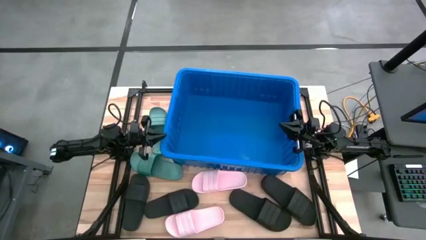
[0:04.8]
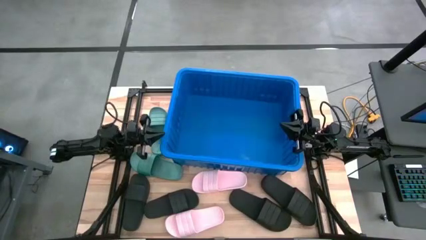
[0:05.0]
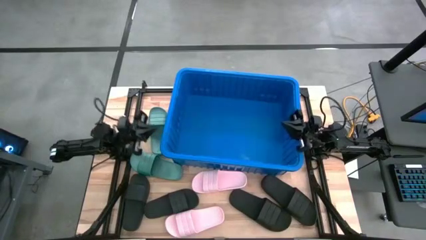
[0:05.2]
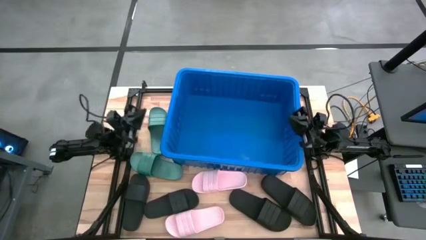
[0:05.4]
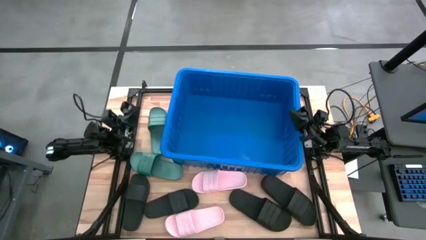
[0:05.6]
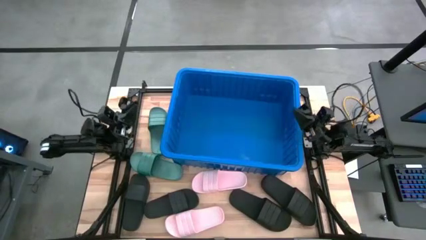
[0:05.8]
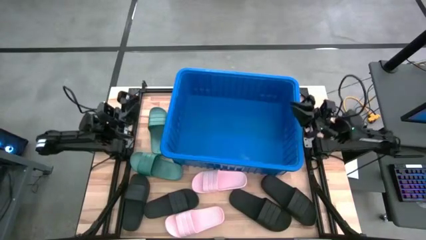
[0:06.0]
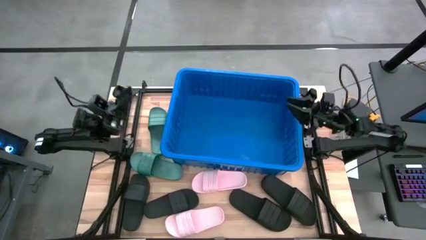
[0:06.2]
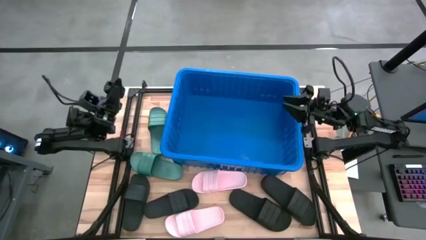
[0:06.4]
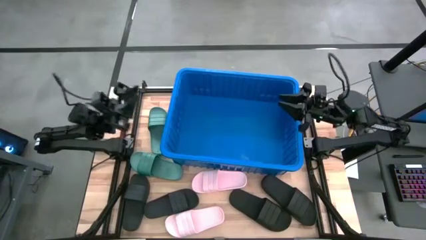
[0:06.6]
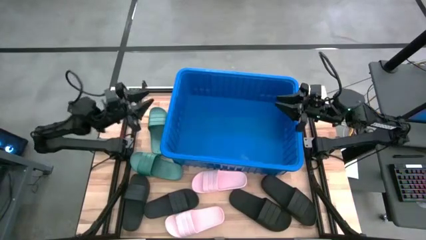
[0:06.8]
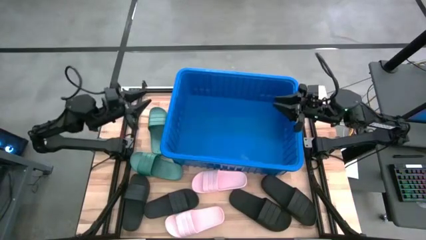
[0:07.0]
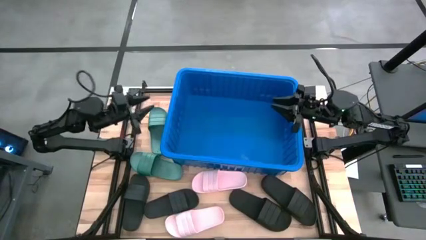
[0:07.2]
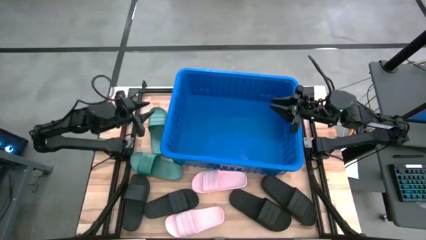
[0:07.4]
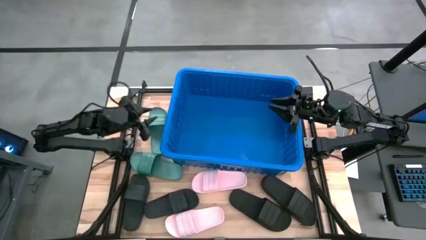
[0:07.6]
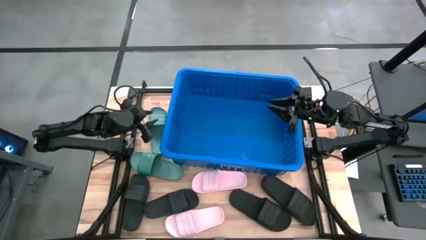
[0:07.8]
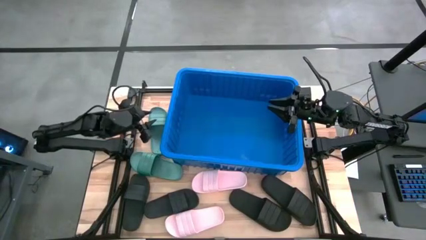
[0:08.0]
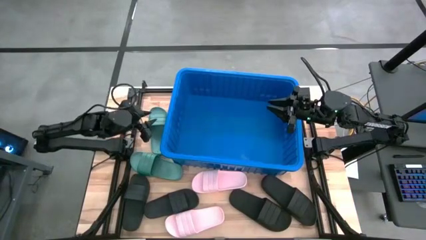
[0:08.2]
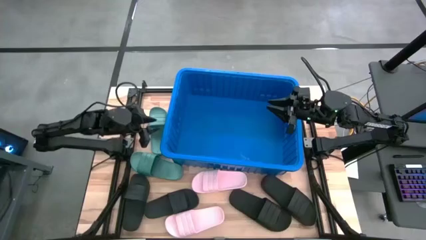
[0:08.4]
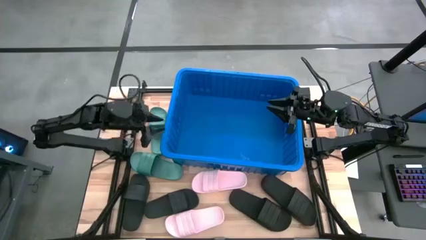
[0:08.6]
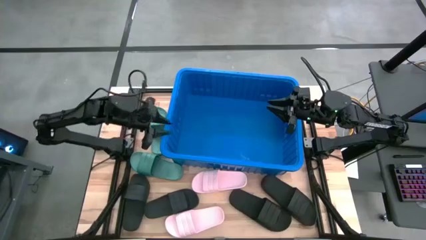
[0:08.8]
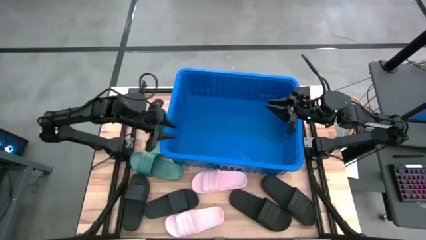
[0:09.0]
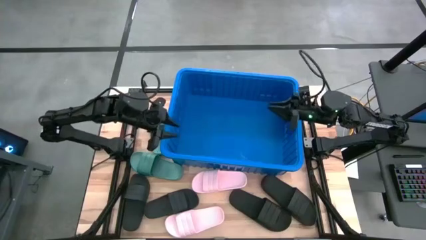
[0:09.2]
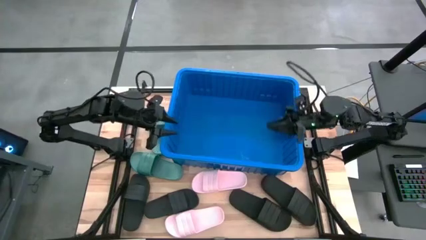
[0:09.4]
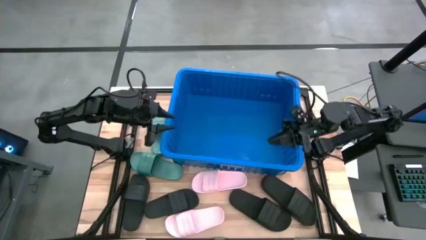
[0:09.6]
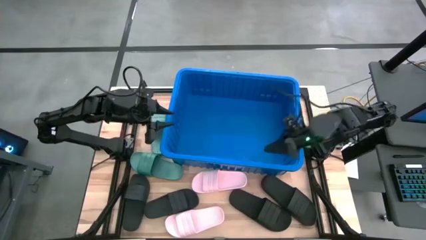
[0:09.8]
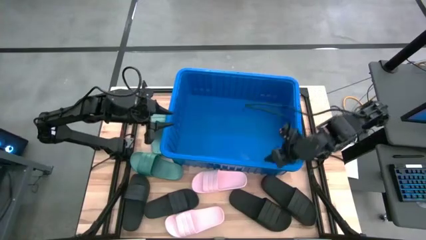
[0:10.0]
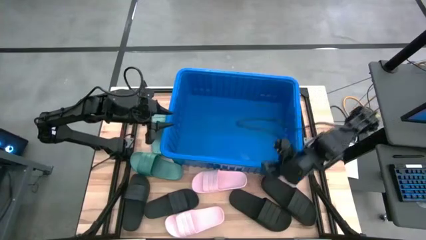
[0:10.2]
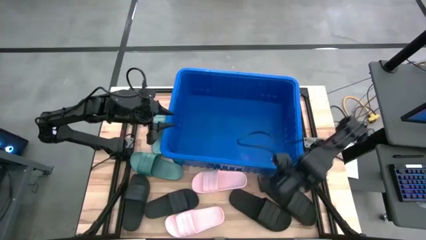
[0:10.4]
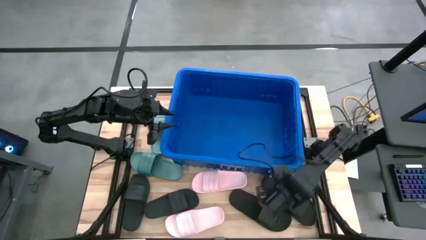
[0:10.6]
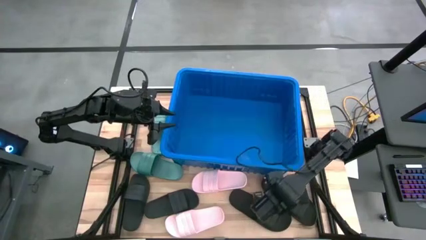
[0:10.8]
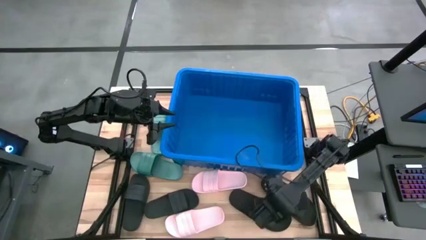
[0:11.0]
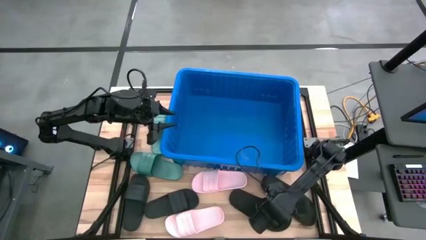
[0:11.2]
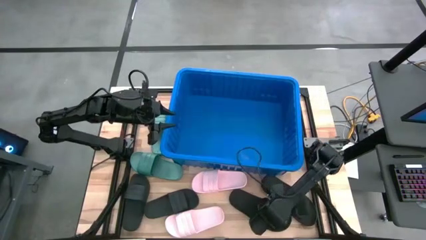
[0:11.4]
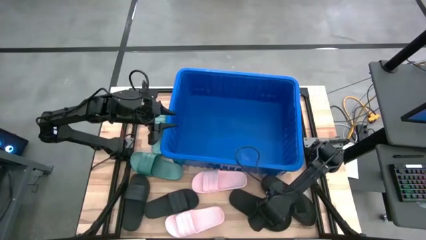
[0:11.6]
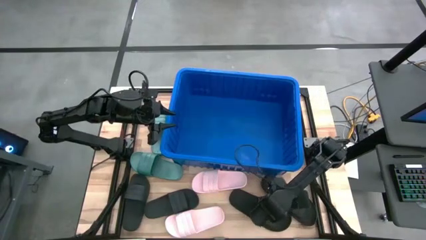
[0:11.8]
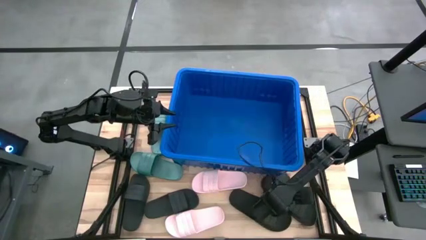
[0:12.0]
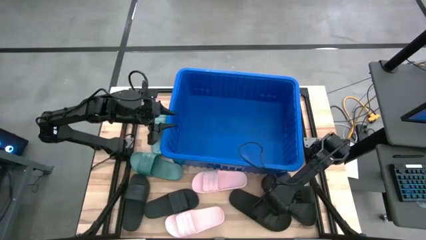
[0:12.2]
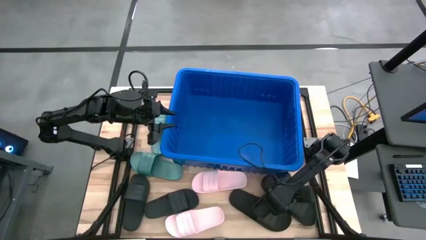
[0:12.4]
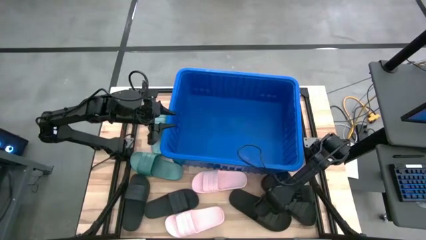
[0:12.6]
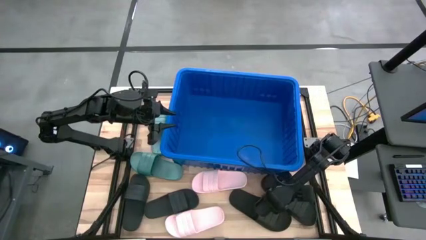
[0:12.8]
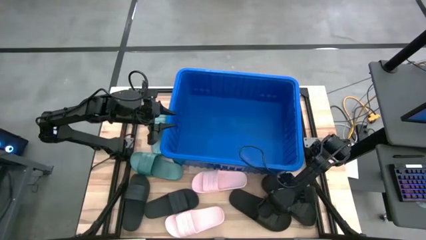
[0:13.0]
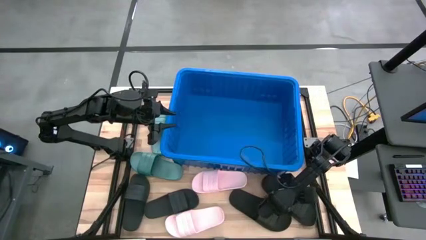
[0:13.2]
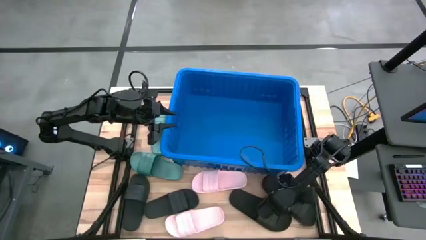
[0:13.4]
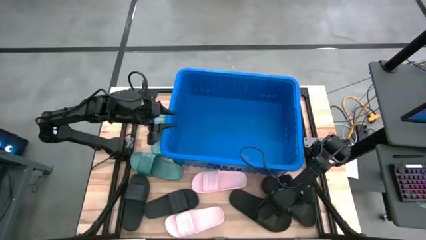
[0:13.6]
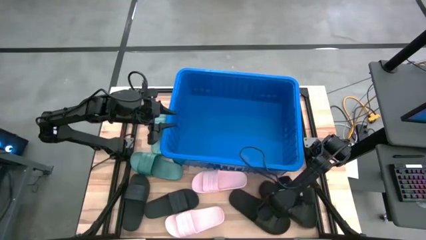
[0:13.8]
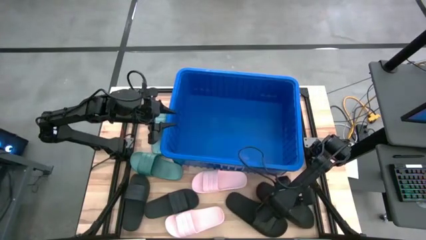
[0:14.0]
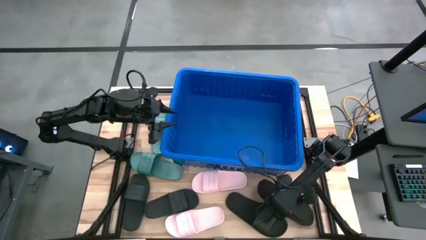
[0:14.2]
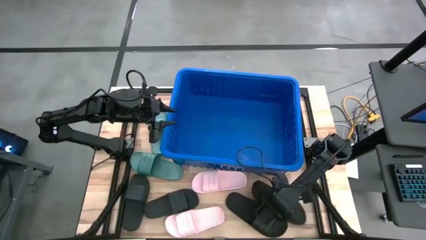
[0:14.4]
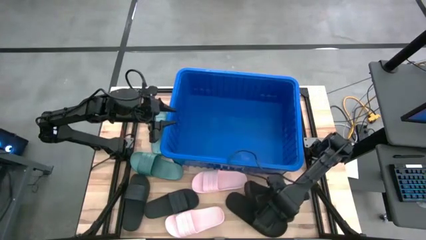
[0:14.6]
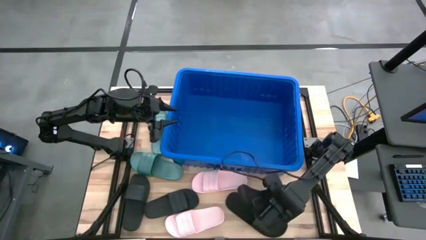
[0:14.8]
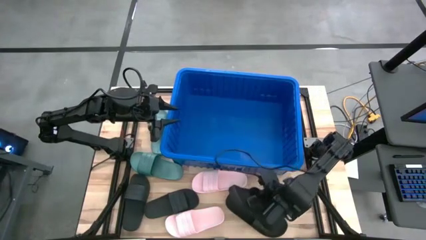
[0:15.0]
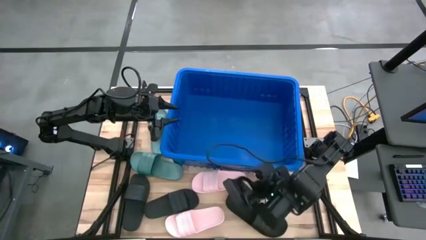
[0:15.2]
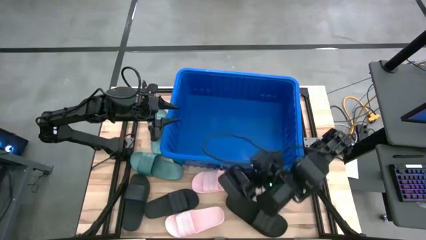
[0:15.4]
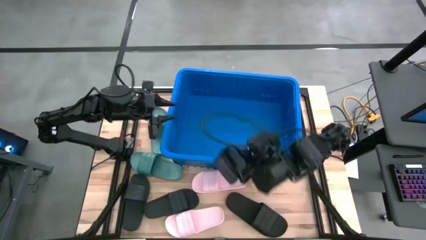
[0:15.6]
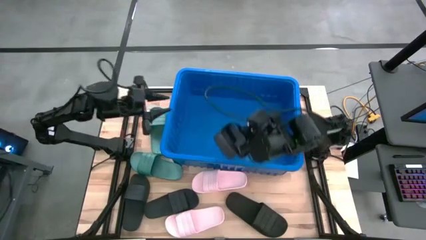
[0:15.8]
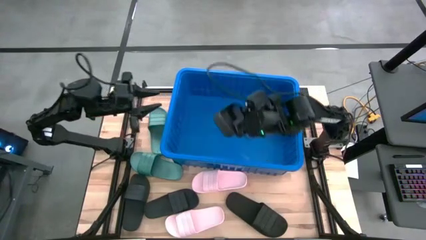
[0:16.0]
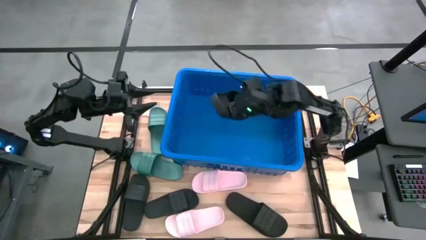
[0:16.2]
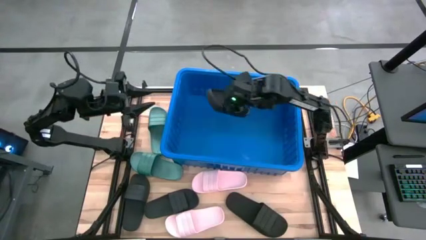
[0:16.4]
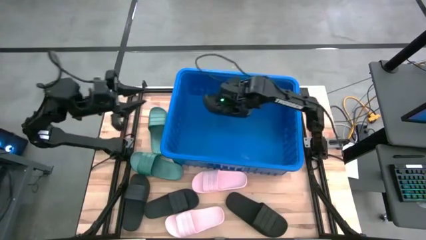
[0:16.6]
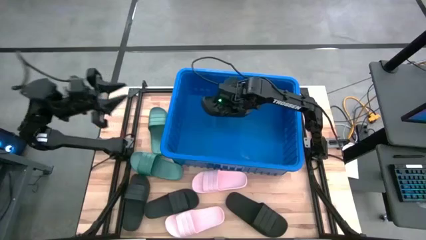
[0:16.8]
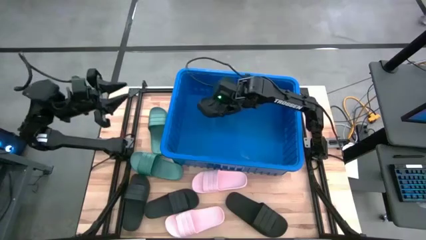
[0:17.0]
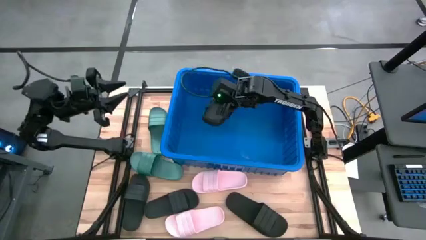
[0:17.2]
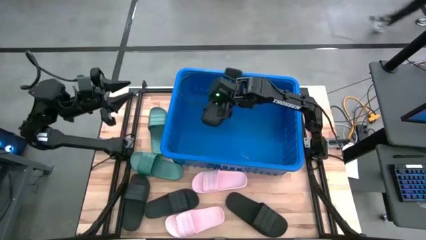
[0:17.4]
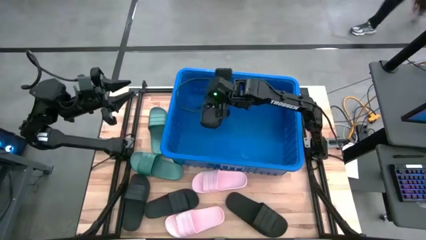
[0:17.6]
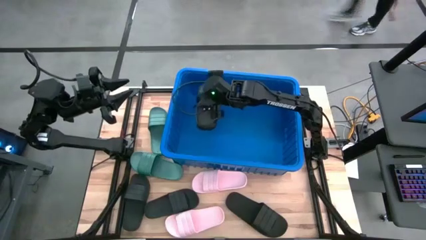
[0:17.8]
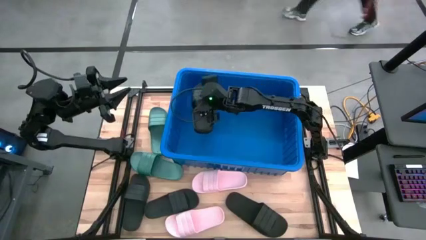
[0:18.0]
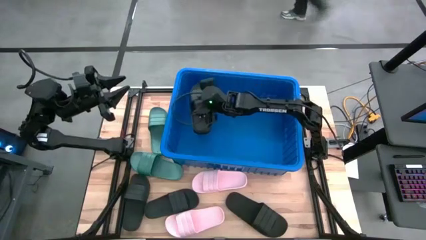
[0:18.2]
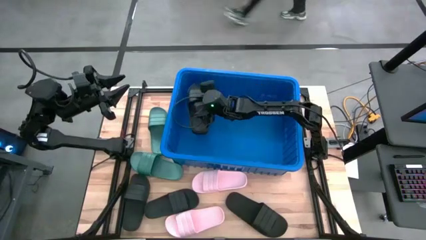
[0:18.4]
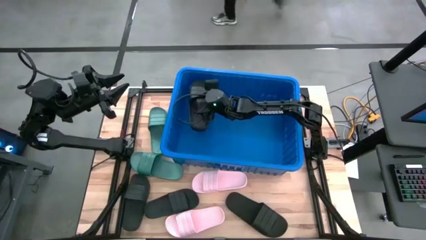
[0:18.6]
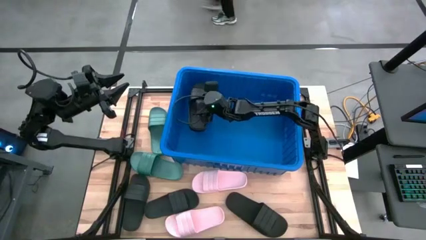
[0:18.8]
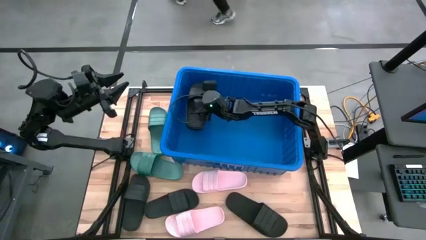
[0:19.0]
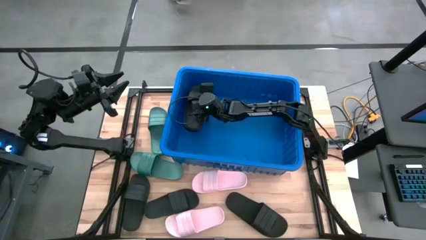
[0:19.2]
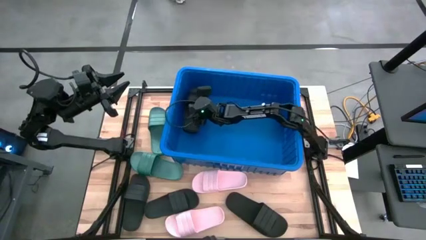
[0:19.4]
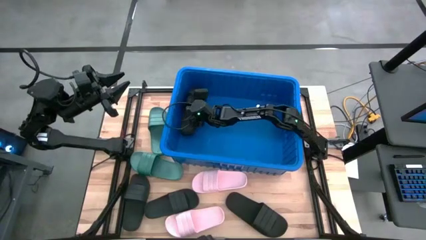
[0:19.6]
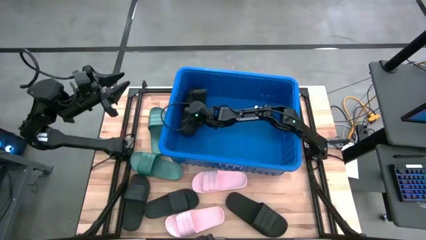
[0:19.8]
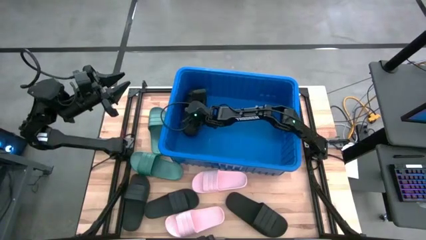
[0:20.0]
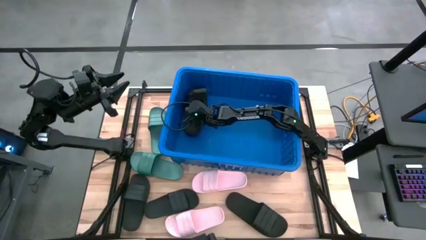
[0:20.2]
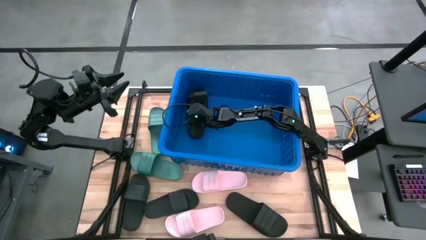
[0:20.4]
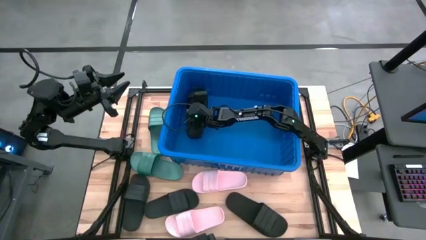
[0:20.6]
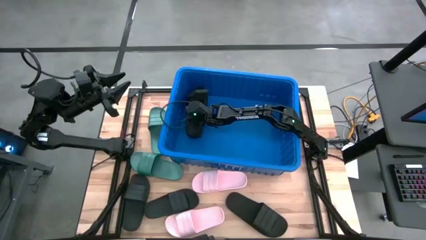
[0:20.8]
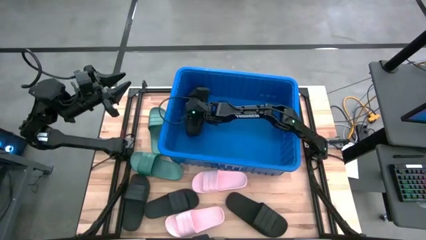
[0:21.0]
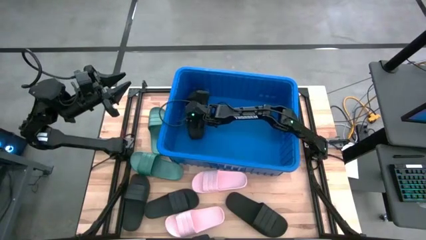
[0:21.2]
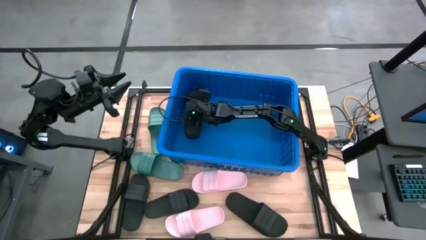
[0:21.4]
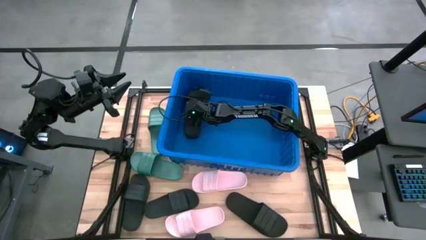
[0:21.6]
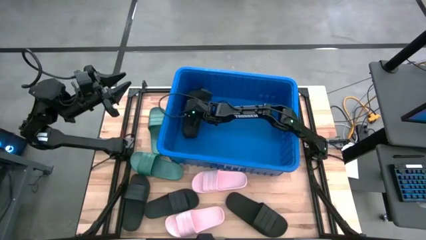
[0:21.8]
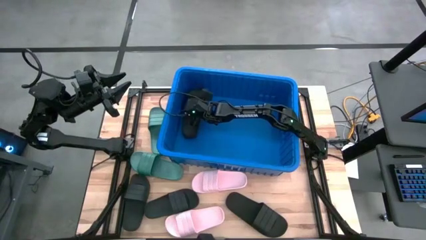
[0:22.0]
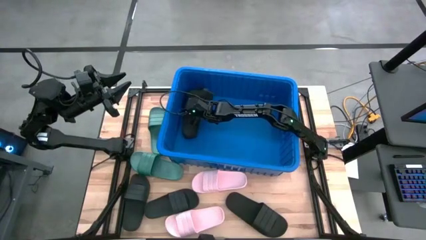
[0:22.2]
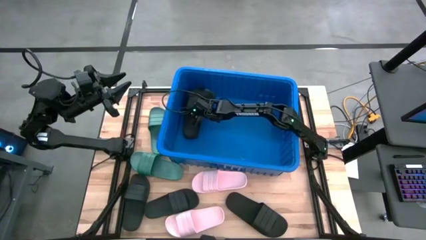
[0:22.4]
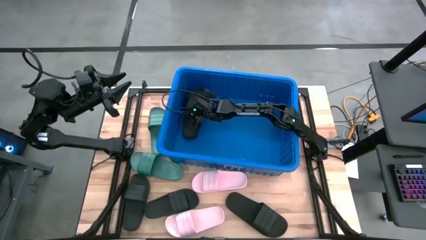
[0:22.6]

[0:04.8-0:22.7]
Task: Pick and place slides into bin
Put the black slide into the blue bin
